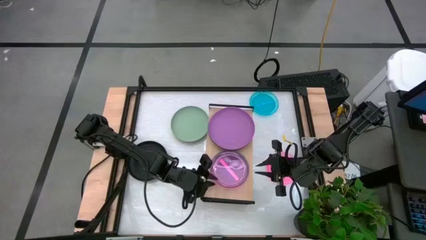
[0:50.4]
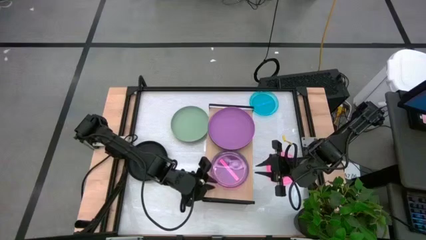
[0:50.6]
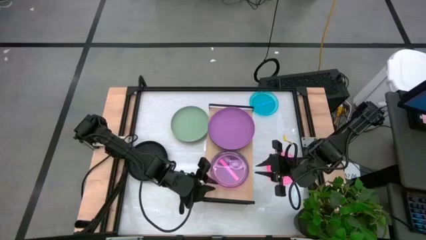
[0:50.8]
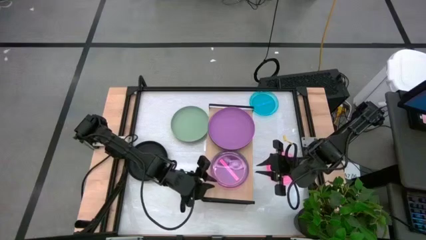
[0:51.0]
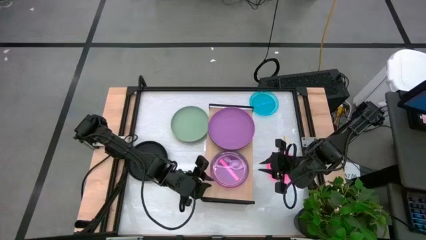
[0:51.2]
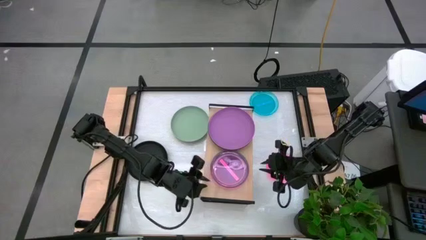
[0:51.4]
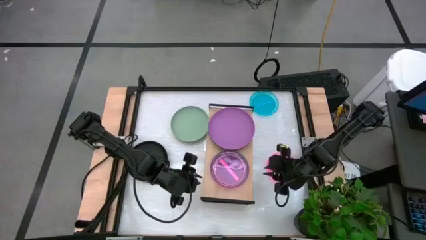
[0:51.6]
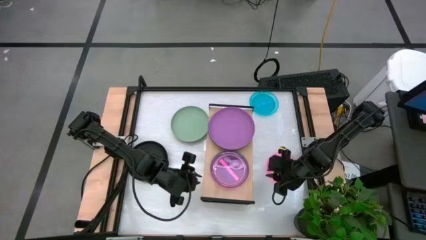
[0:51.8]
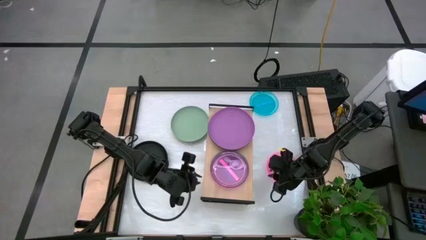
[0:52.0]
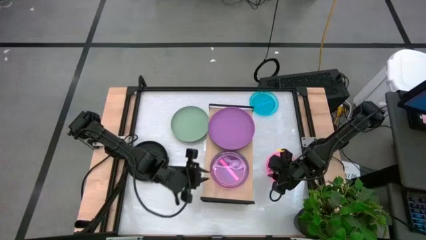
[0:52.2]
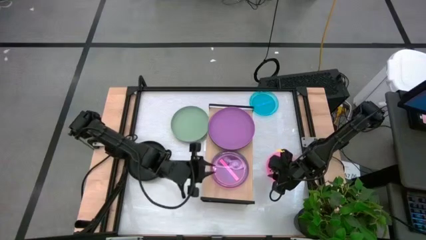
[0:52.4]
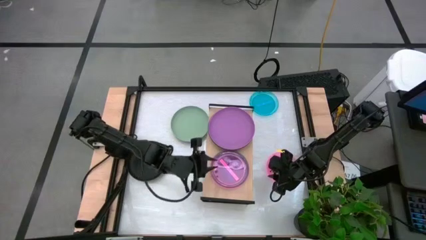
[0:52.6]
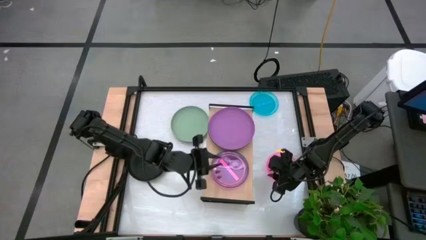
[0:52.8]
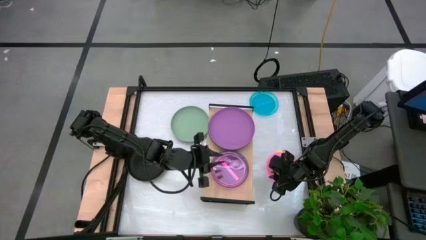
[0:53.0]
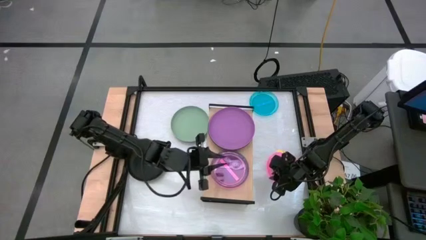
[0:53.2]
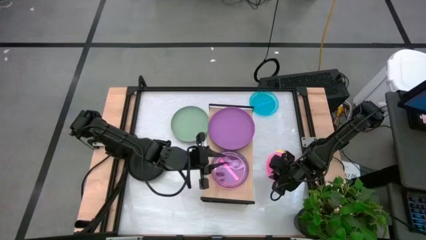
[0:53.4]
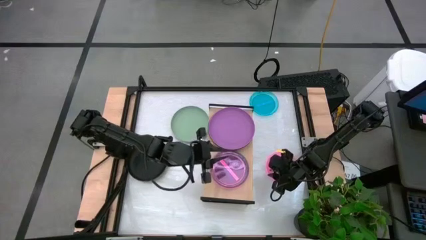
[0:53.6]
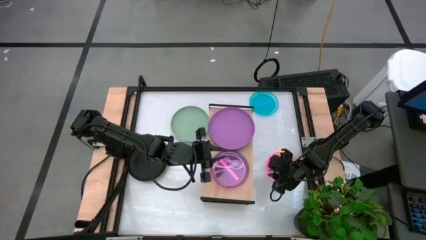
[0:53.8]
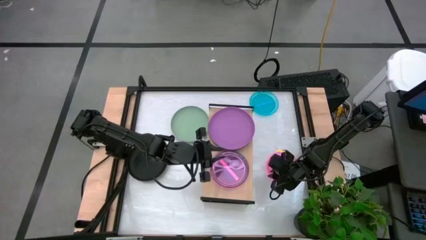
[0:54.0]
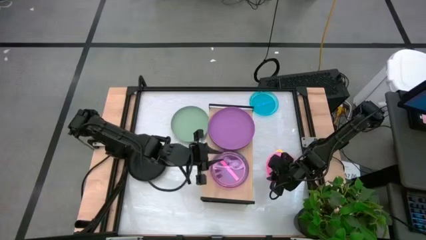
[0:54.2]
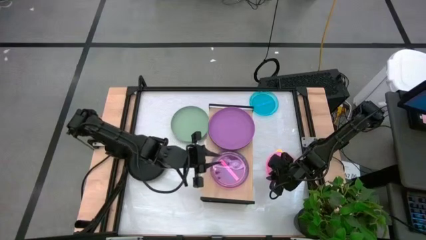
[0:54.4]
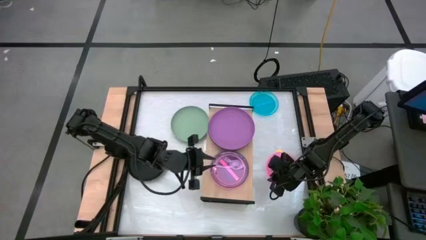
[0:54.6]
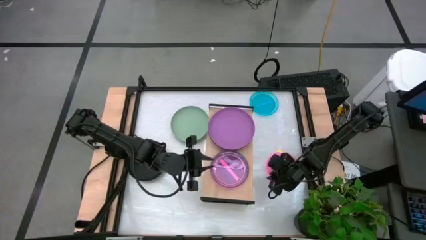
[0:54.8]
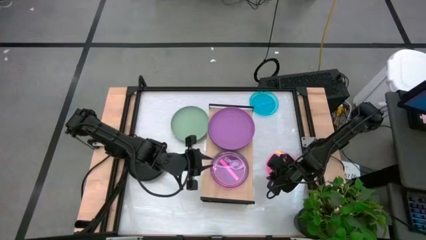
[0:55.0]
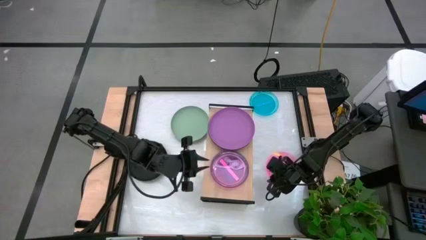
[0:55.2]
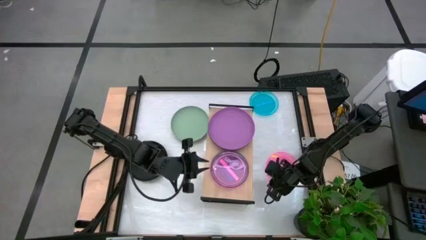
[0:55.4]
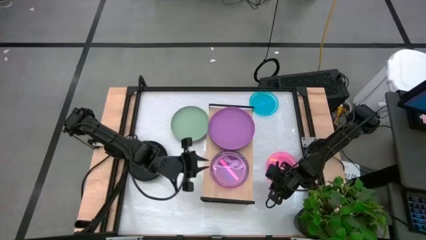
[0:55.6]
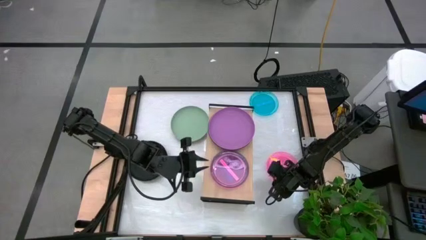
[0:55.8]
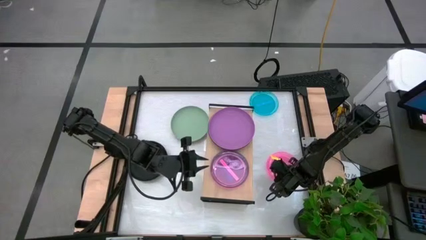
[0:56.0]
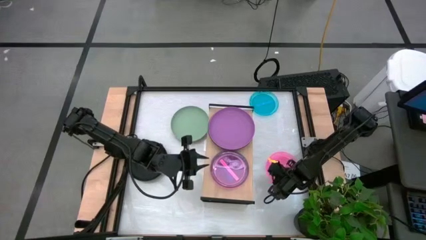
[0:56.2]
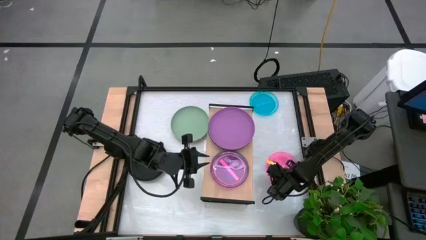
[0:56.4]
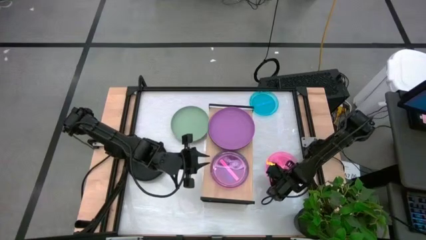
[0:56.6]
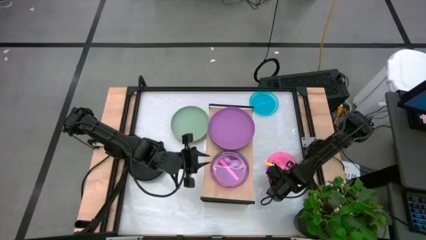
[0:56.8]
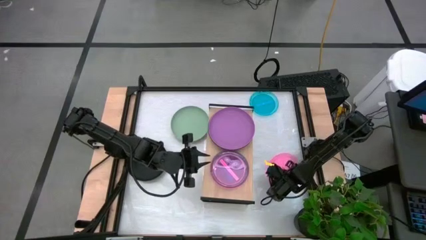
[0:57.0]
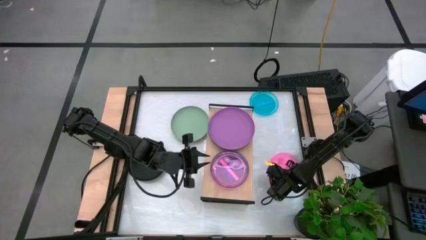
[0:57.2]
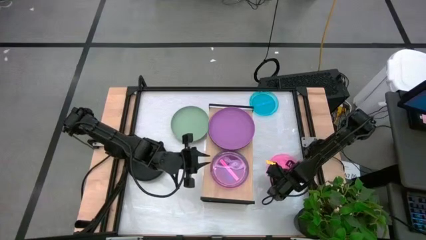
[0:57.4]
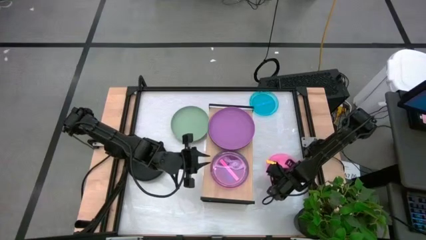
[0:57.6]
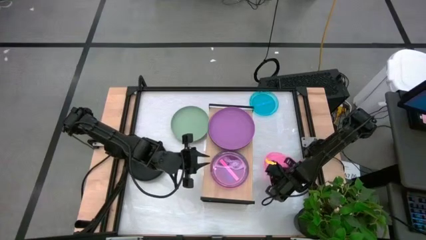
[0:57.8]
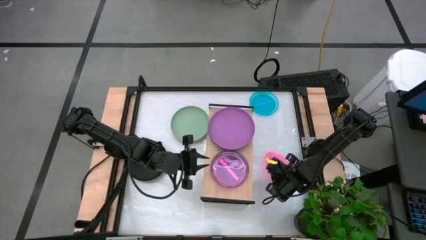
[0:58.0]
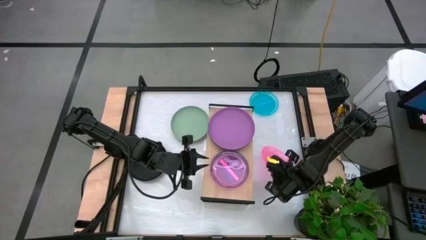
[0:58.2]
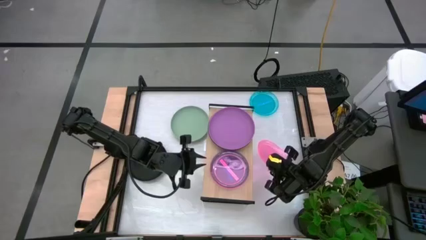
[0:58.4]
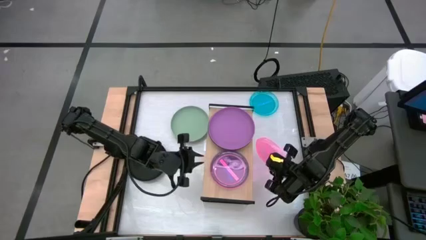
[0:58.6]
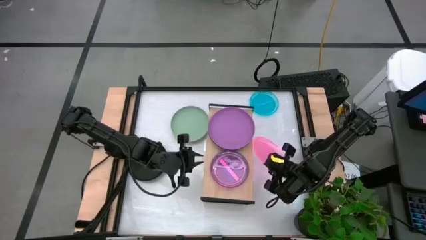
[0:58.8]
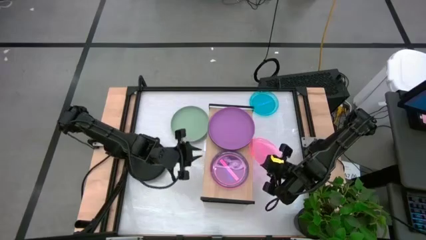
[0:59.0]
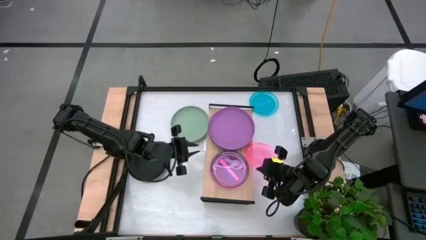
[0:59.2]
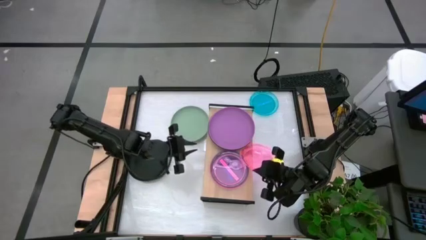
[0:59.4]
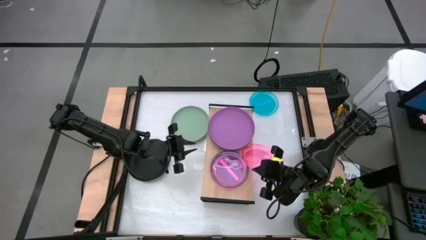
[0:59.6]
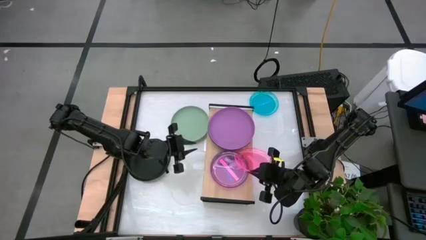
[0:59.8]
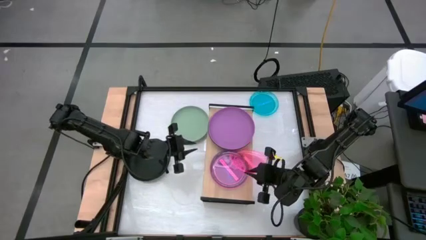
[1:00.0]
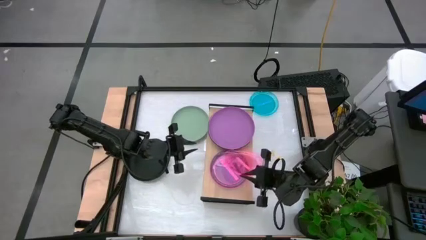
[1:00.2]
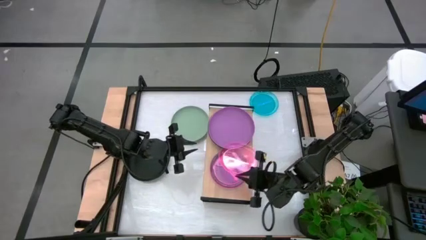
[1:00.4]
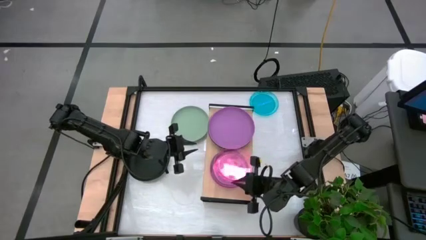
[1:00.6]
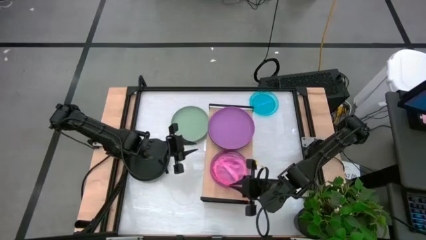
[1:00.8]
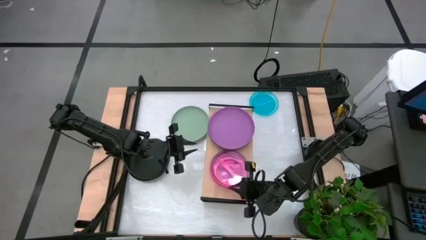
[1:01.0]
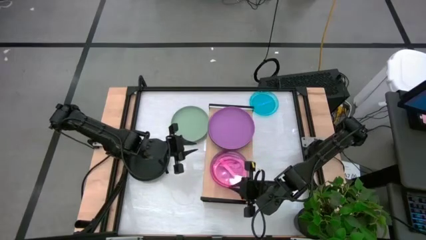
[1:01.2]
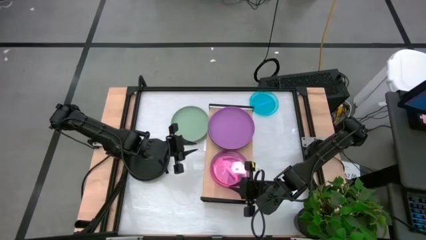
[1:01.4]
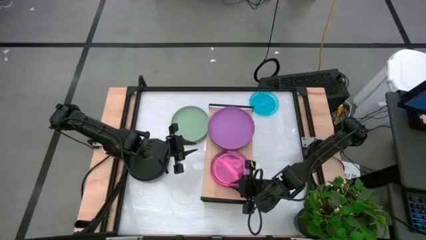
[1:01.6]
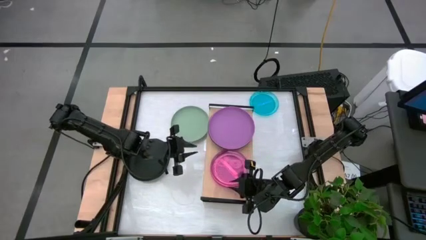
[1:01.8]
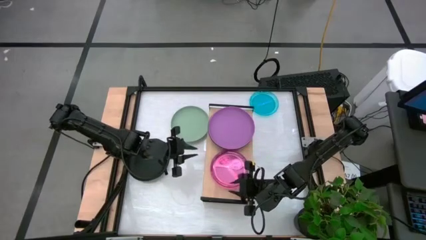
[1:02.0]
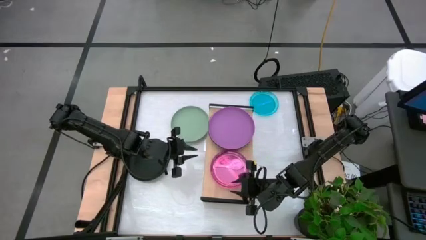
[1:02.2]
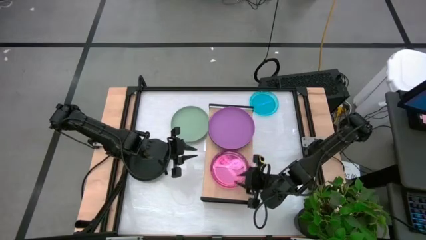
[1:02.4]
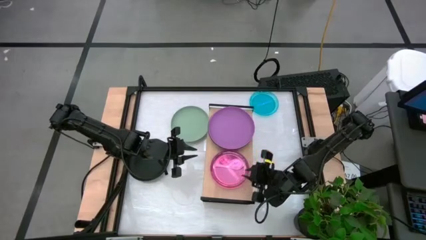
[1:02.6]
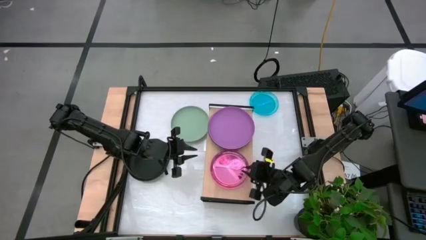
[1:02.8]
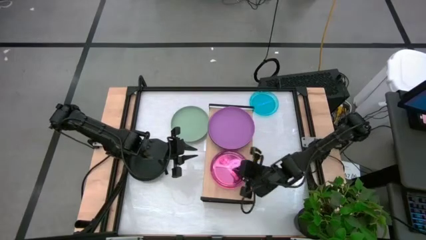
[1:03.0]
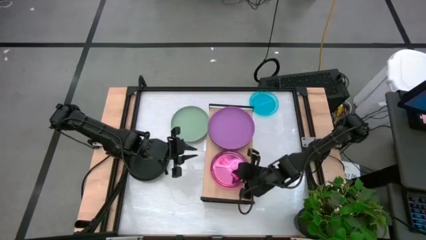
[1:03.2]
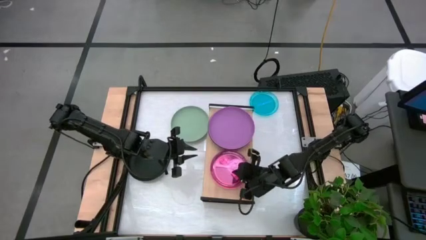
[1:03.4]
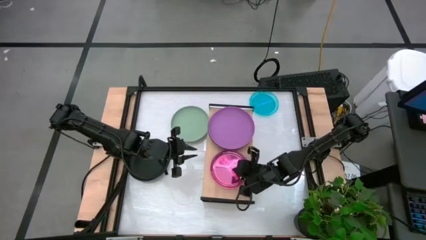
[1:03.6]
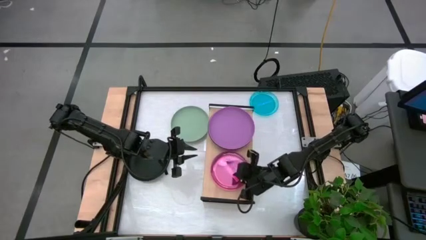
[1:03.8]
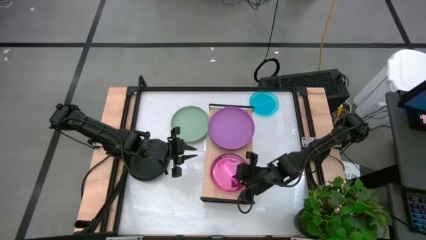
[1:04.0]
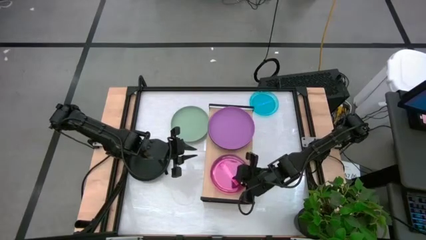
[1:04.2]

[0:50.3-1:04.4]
Task: Place and stack plates onto a shelf
Stack the pink transparent plate on top of the pink transparent plate on the shelf
